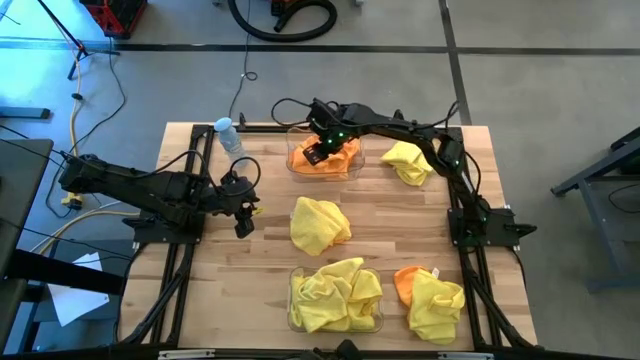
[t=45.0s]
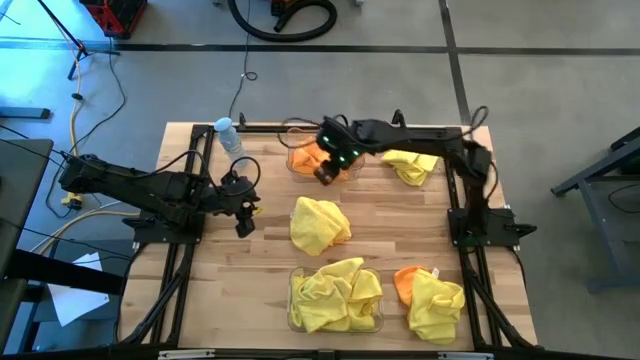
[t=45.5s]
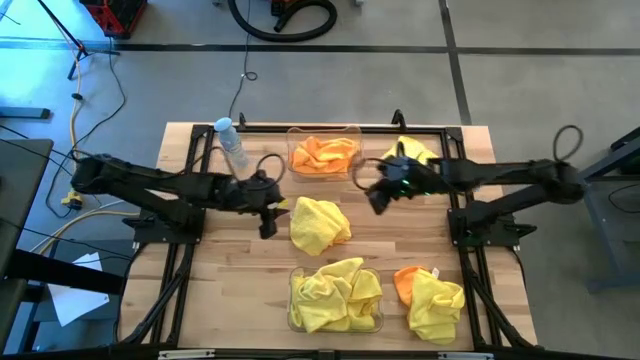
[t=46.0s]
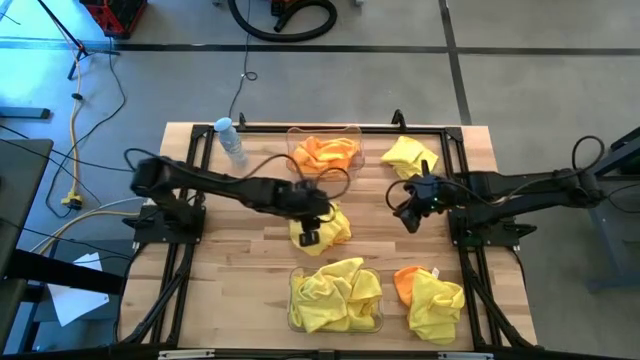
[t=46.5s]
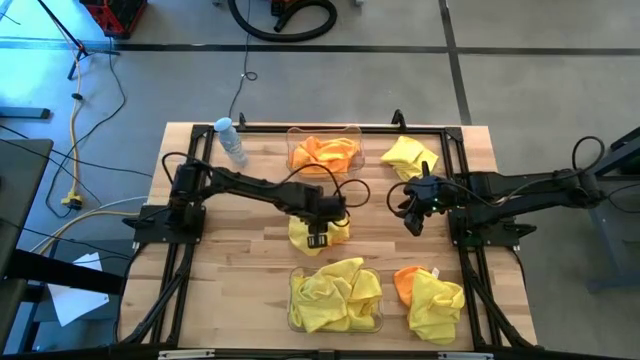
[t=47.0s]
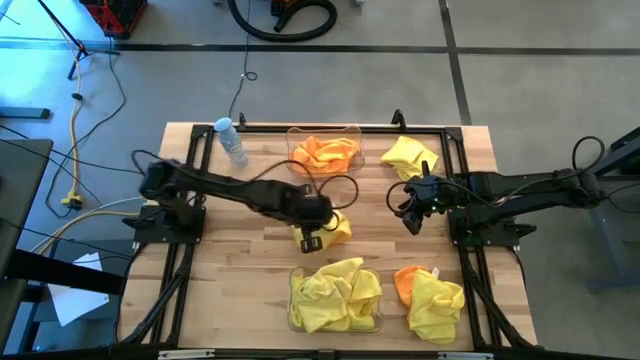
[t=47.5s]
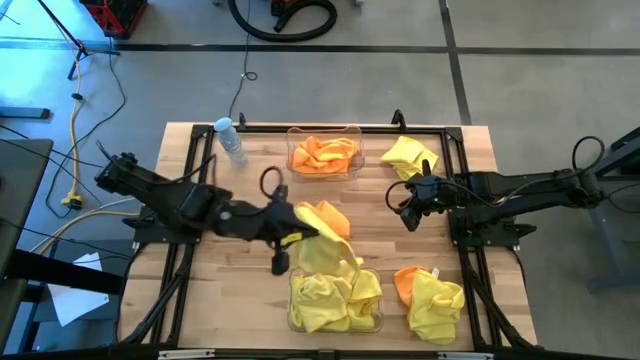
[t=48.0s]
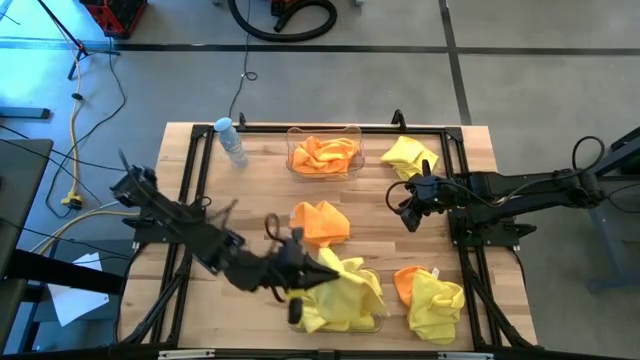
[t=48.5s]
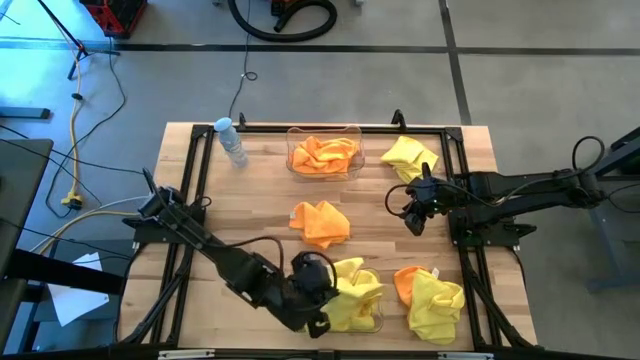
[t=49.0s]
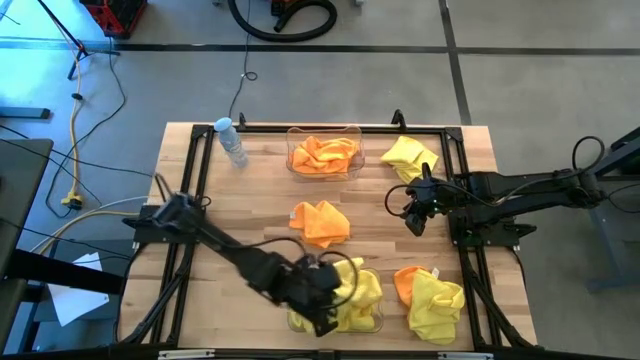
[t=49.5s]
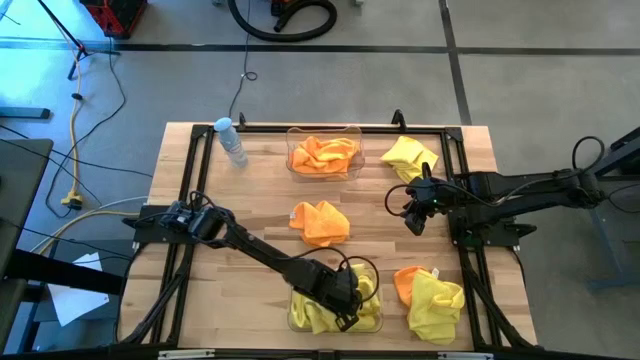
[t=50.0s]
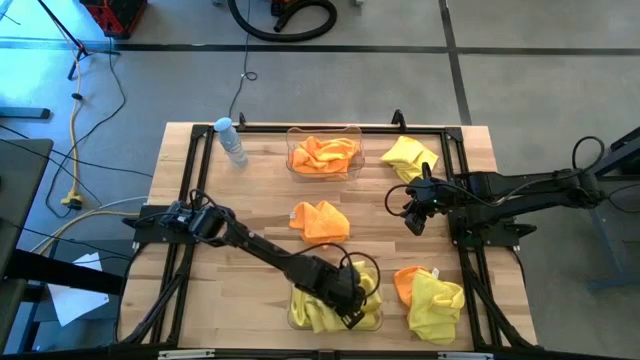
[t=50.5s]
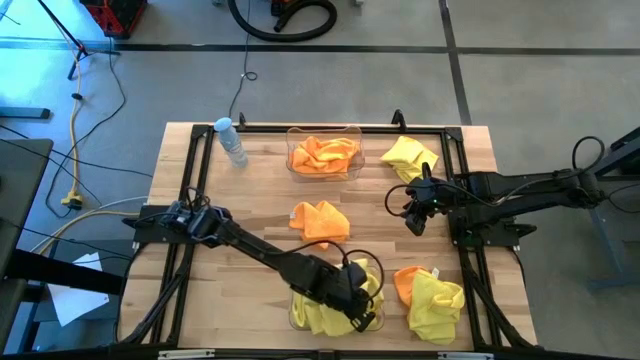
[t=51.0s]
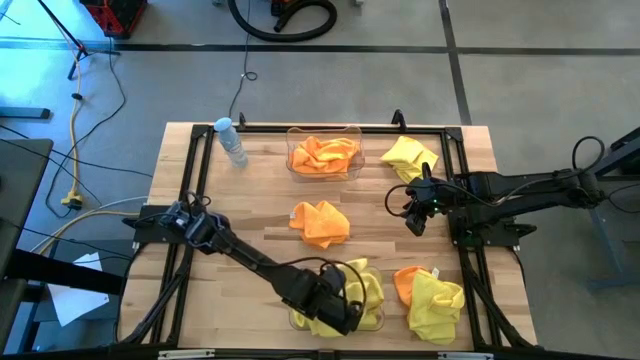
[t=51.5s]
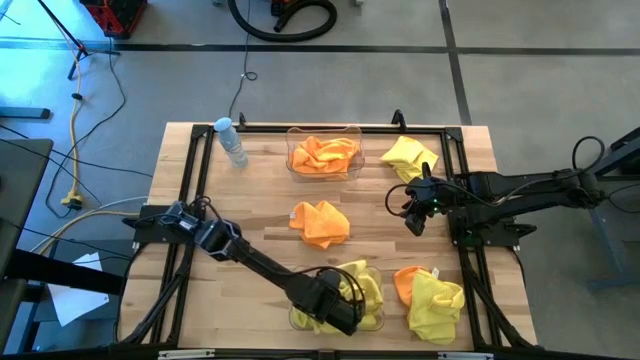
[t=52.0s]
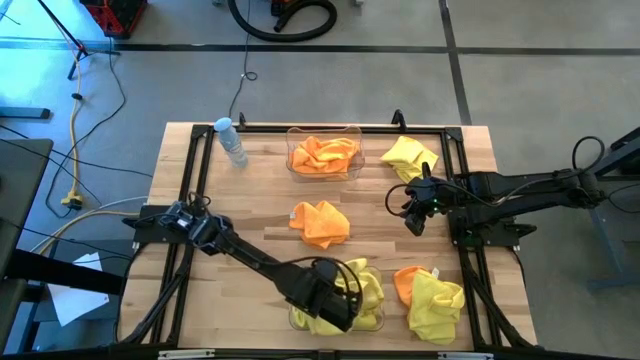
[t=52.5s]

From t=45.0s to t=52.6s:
Task: Sort microfiber towel by color & place in baskets
Put the yellow microfiber towel into the bottom transparent bin

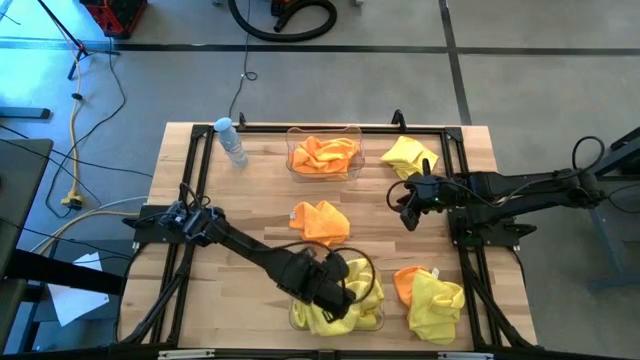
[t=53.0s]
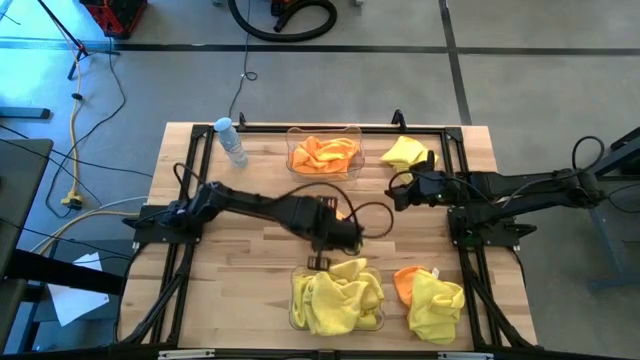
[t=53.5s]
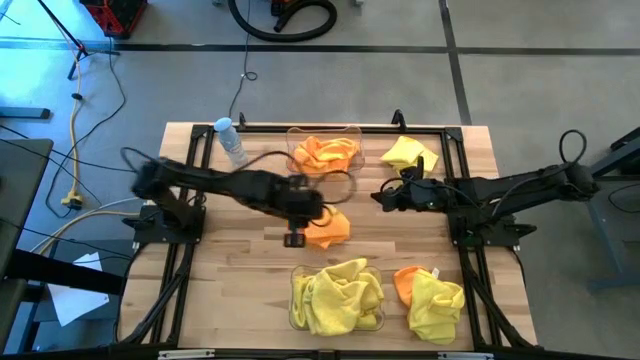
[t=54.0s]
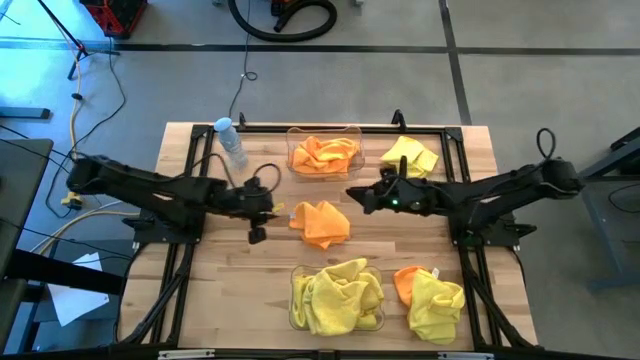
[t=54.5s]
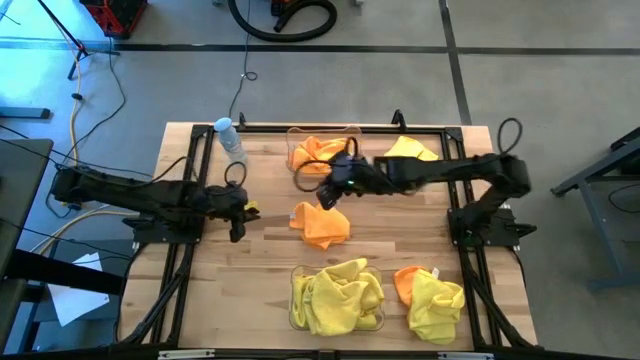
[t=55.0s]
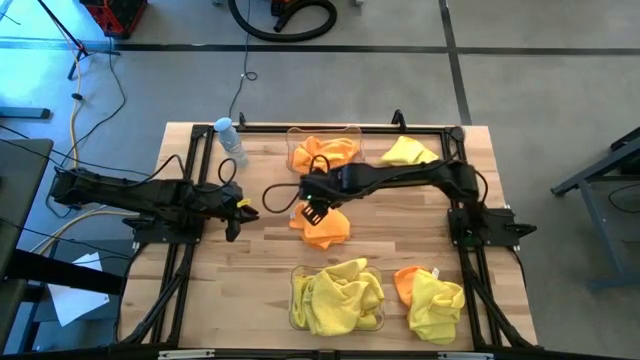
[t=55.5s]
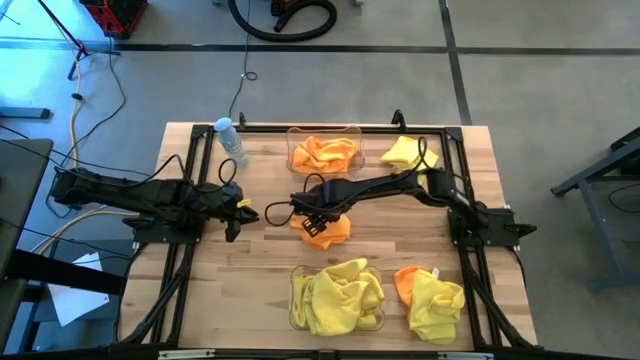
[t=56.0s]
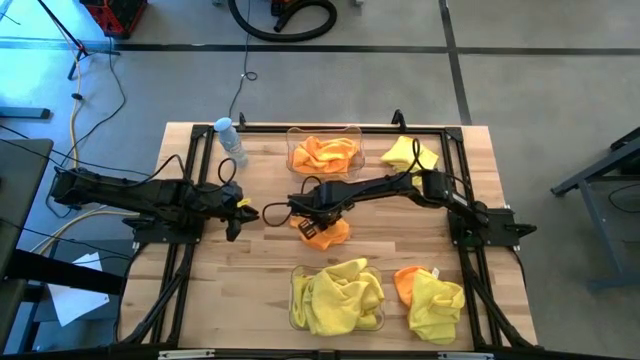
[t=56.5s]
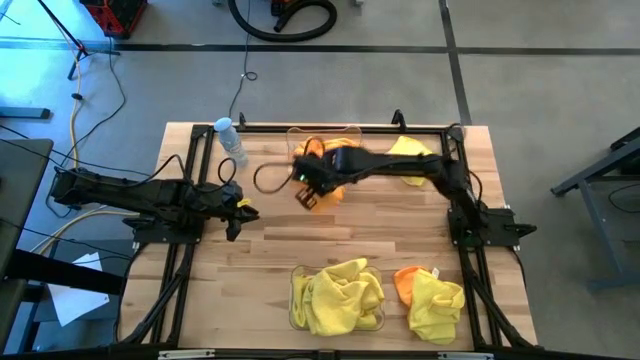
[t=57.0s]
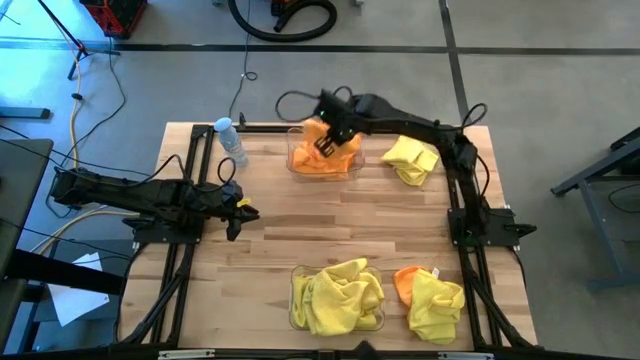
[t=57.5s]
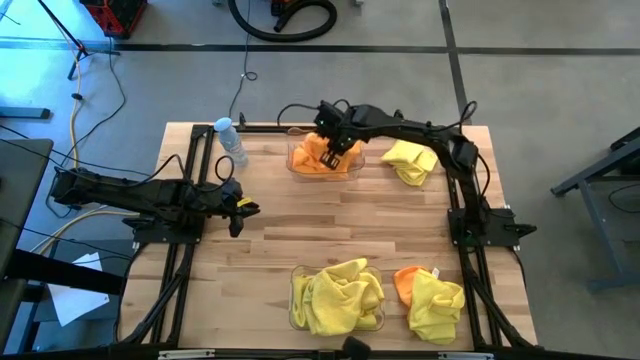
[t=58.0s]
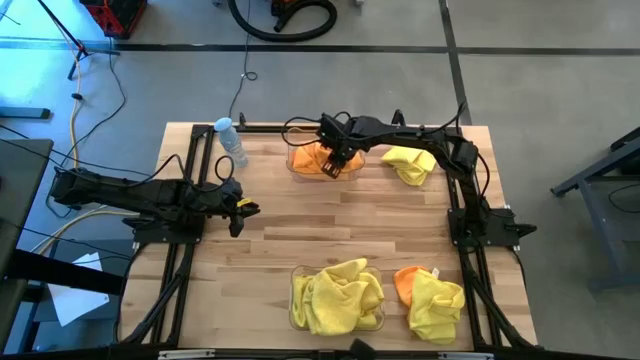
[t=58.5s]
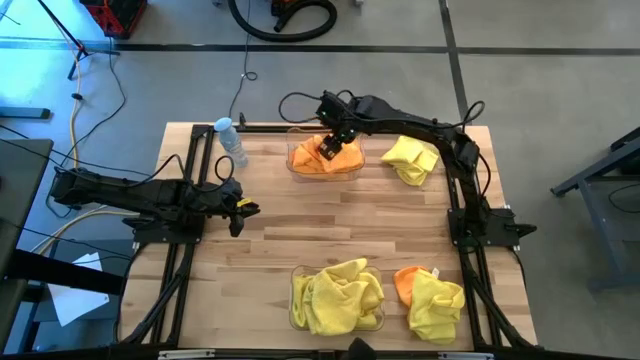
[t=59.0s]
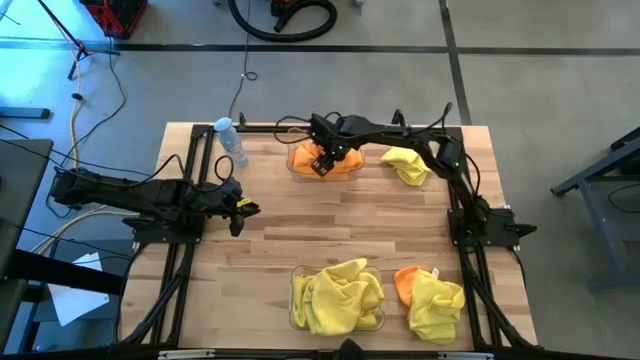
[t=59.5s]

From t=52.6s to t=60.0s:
Put the orange microfiber towel into the top transparent bin

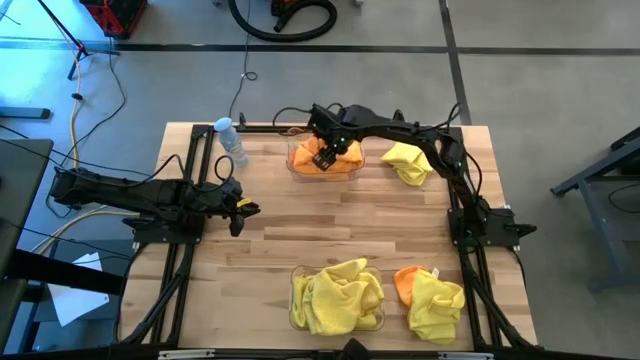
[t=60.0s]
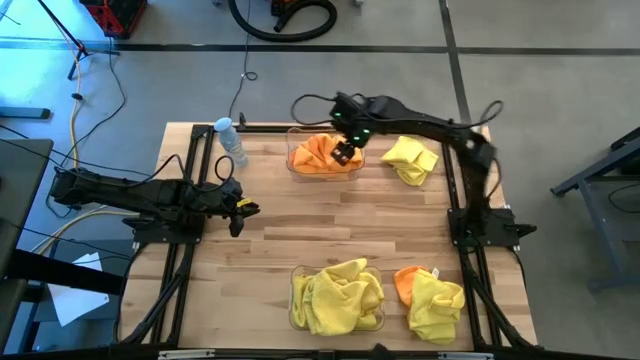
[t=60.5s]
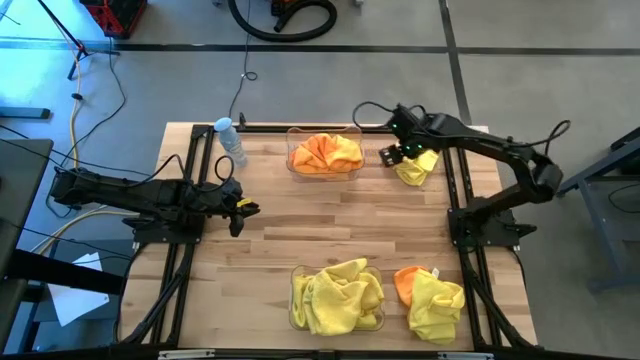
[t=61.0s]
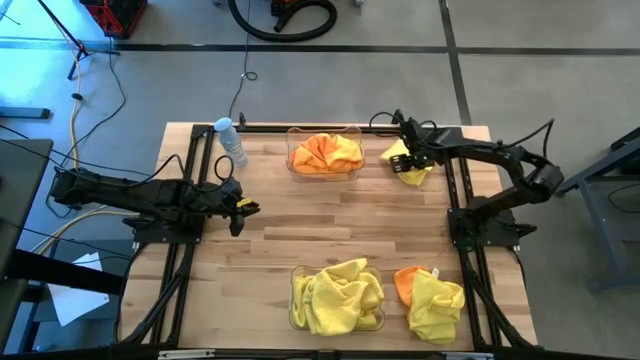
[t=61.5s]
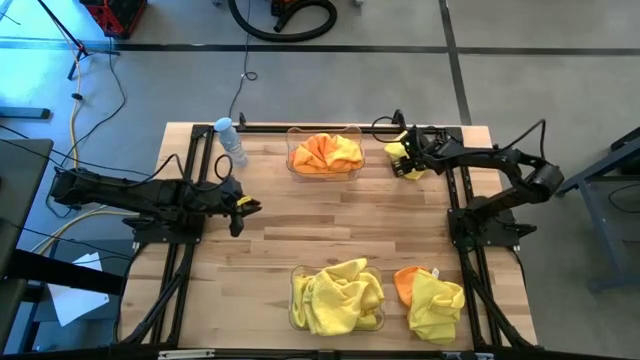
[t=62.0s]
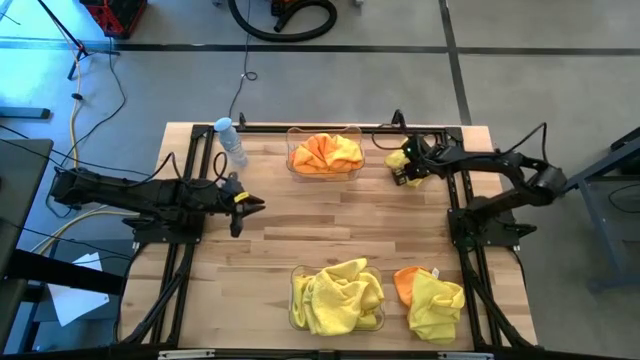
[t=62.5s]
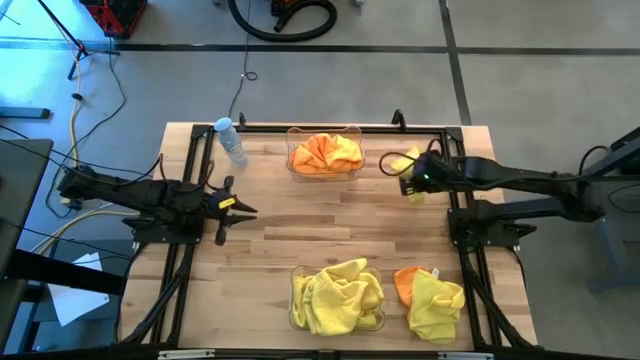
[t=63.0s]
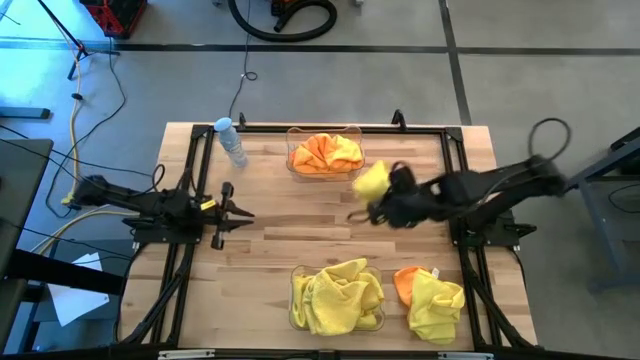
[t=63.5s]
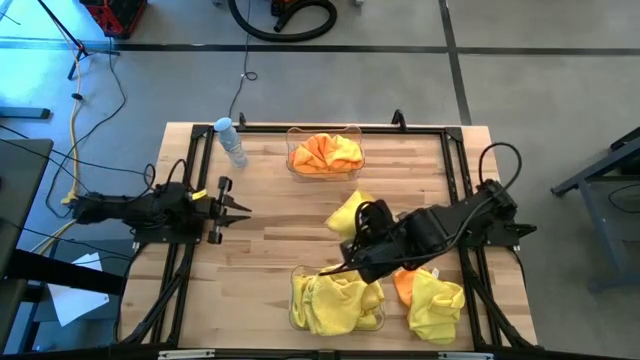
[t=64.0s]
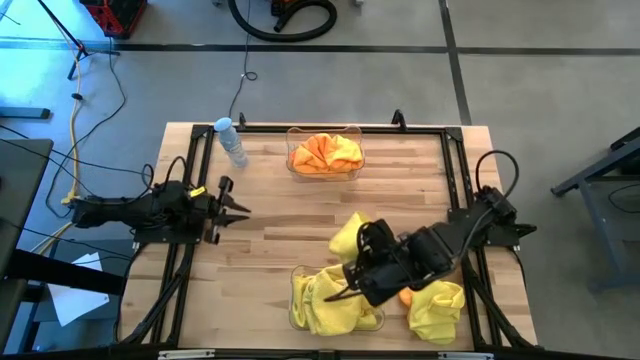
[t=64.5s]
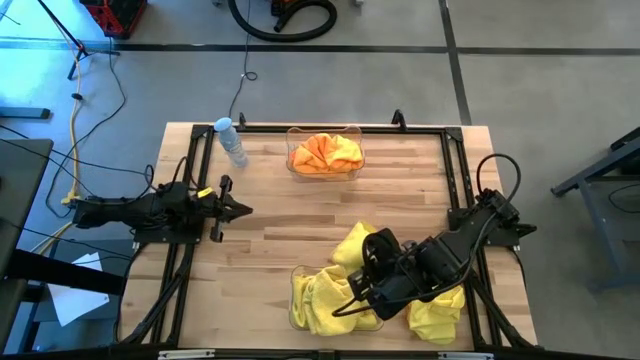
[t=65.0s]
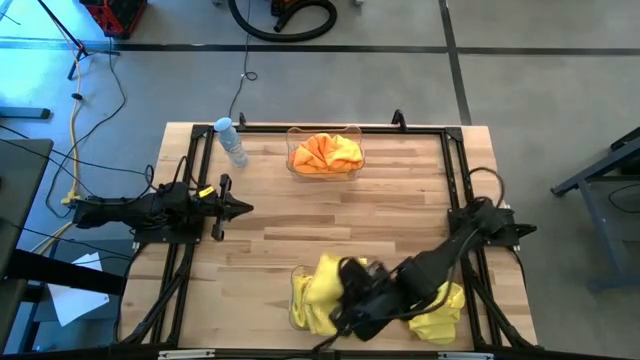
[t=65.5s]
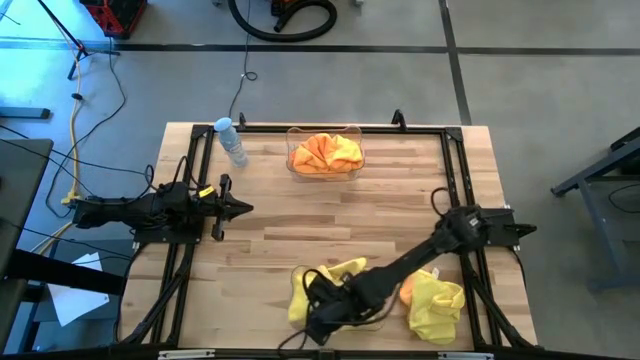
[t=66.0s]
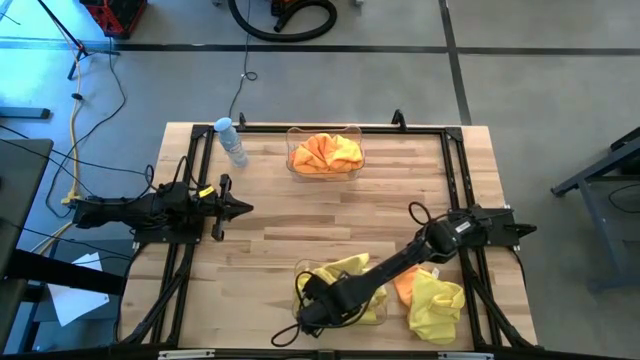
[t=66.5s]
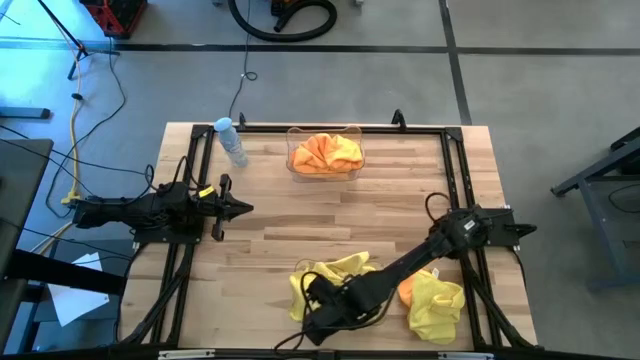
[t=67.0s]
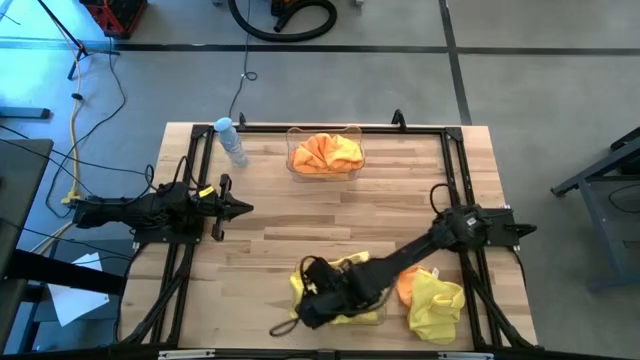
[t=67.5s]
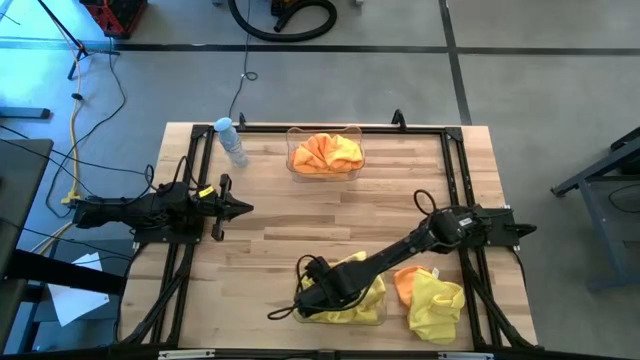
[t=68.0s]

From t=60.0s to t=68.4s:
Put the yellow microfiber towel into the bottom transparent bin
